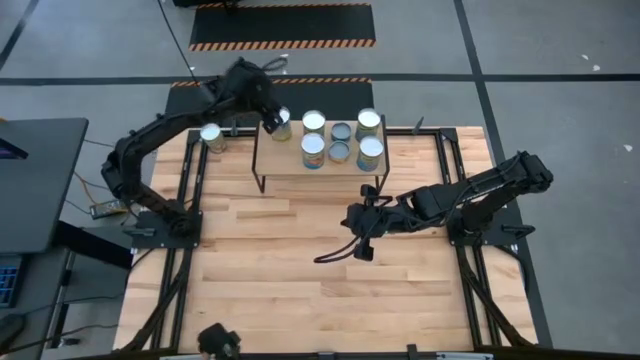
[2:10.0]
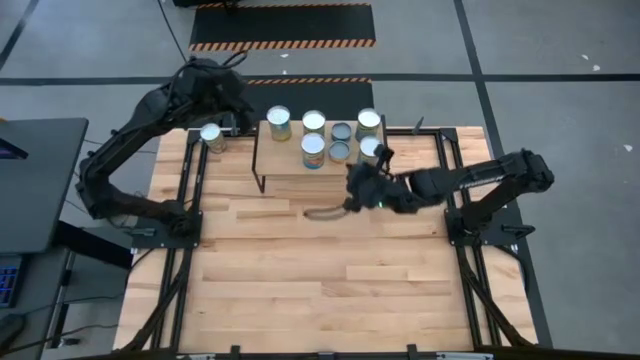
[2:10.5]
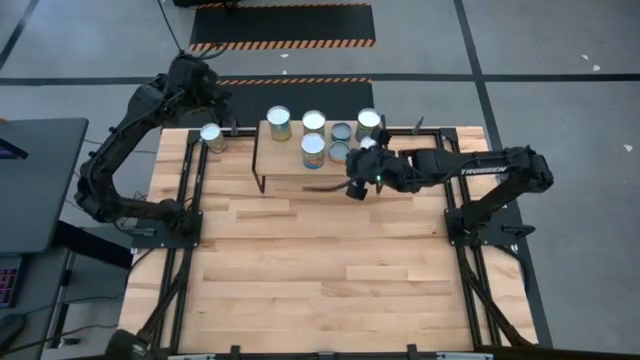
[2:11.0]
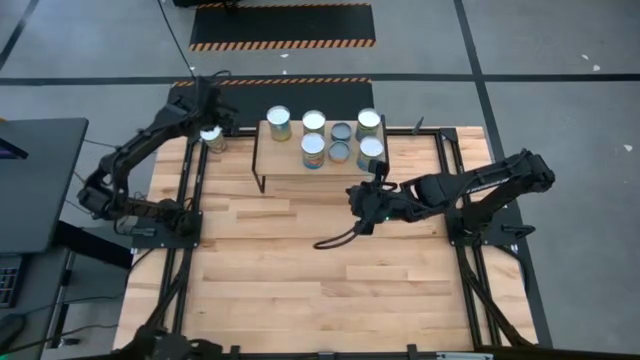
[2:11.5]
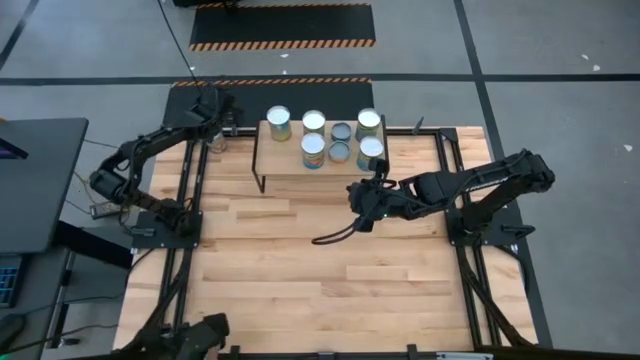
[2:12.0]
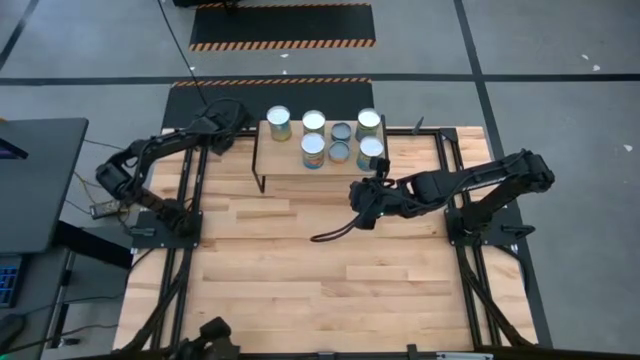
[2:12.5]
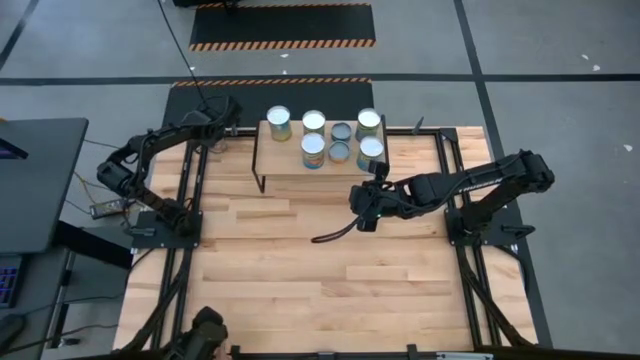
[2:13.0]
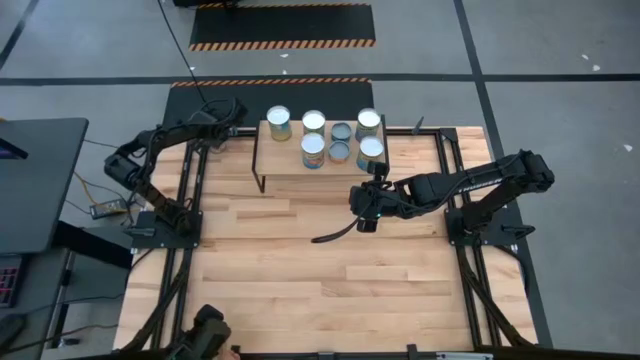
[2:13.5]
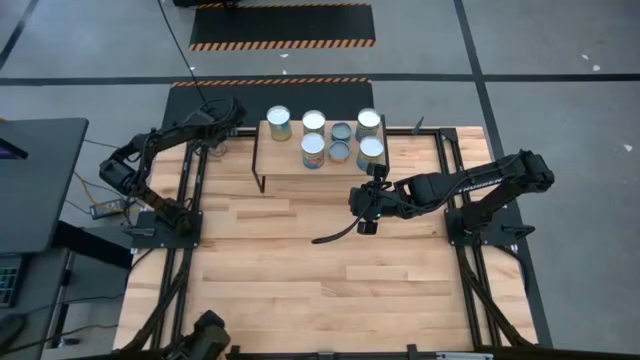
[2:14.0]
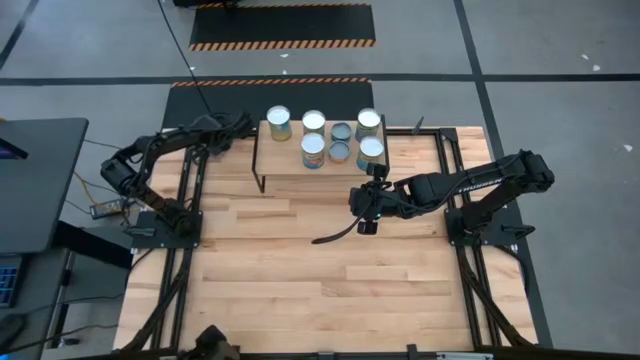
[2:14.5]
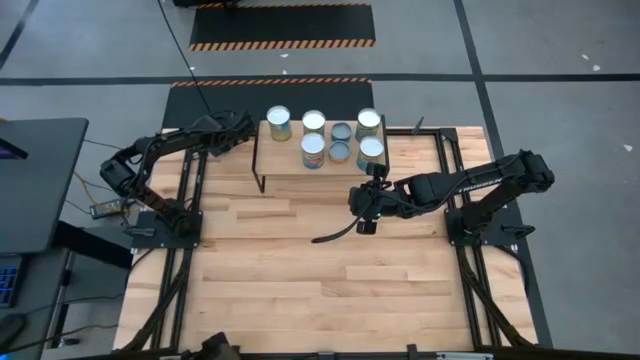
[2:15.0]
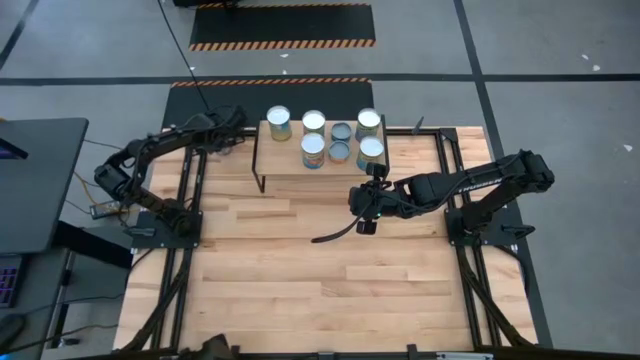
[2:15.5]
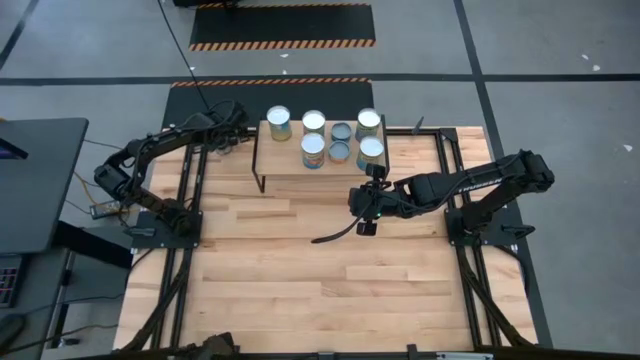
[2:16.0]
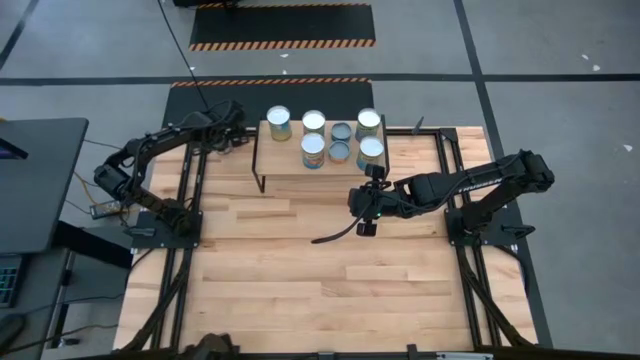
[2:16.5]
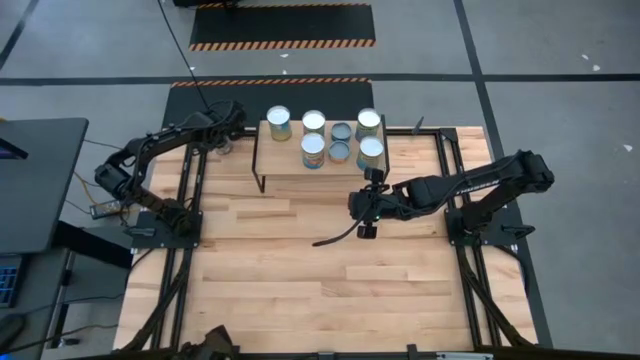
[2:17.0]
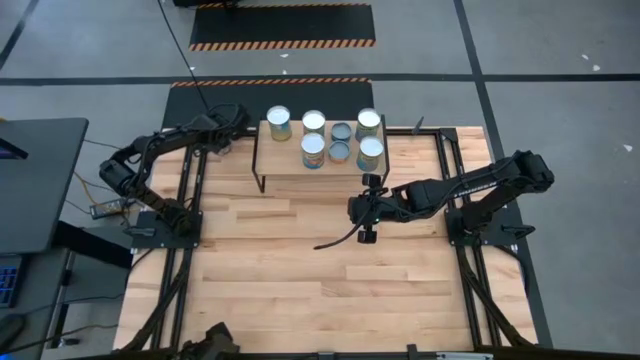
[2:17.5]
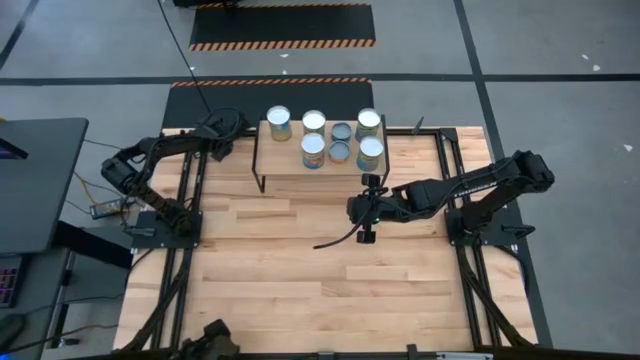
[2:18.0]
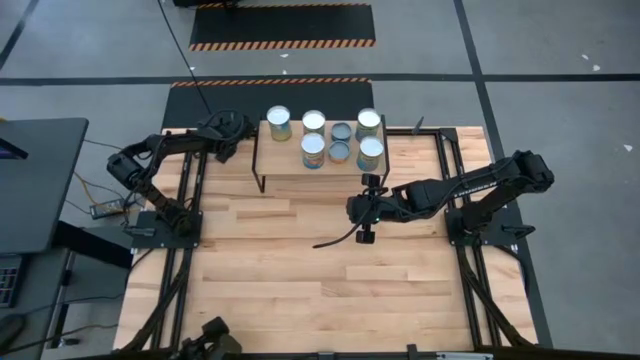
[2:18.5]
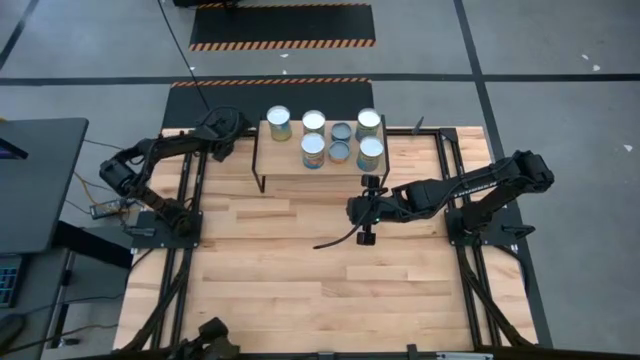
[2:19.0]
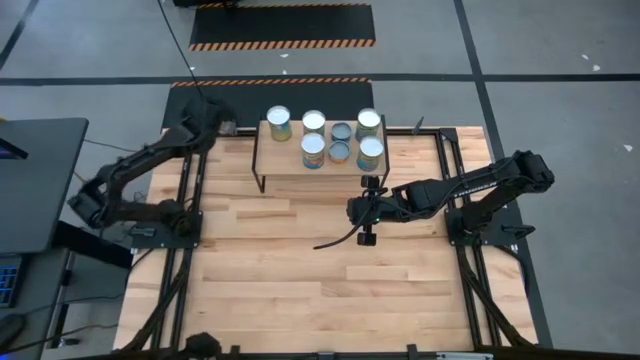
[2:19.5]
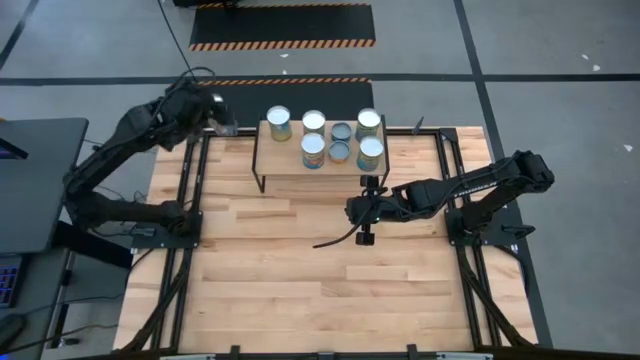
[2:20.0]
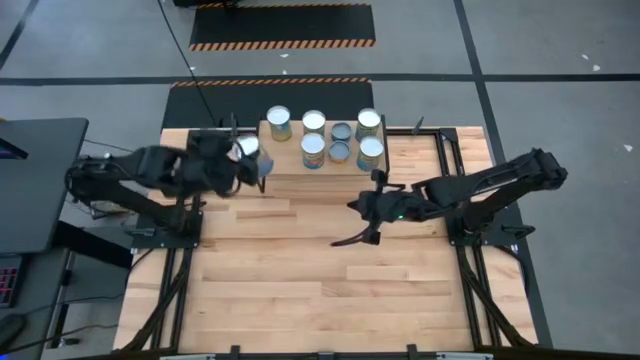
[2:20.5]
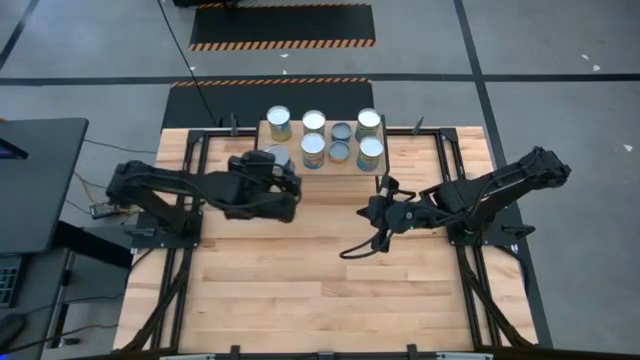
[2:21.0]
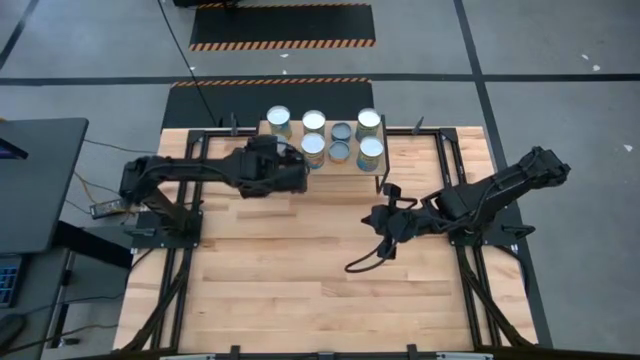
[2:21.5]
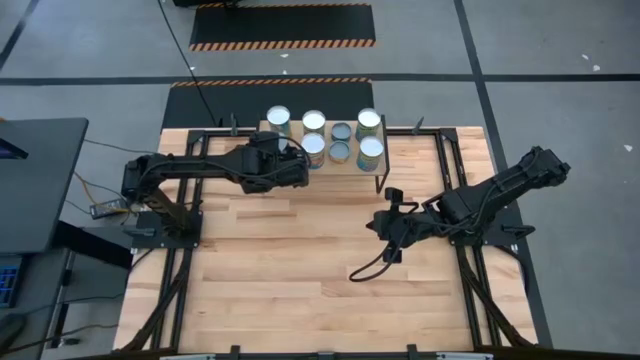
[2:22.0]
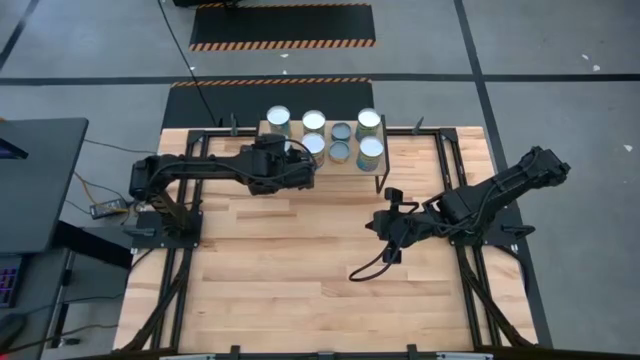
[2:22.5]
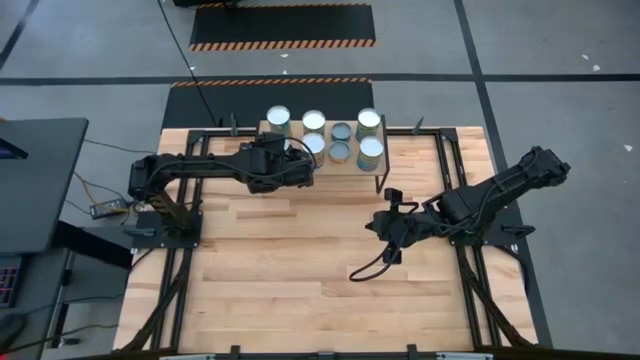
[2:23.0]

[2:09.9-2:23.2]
Task: Pick and place cans onto a shelf
Put the big blue canned peaches on the shelf aligned with the other big yellow canned carrots

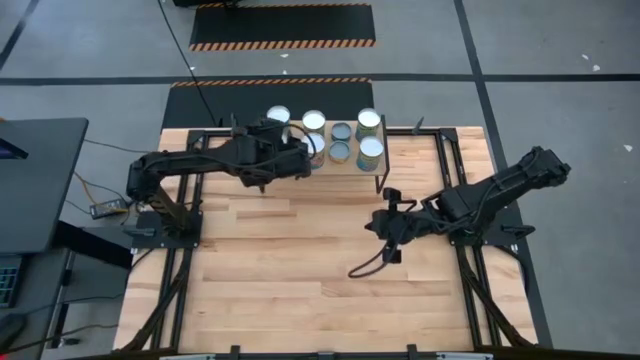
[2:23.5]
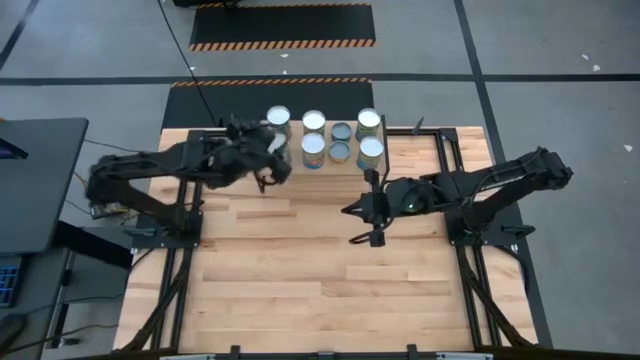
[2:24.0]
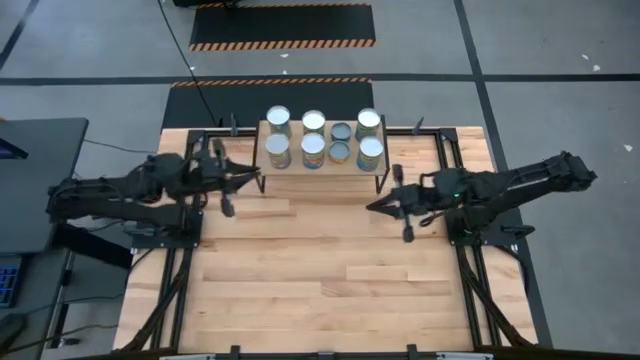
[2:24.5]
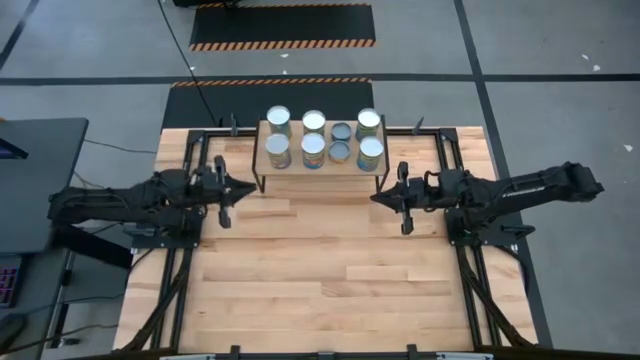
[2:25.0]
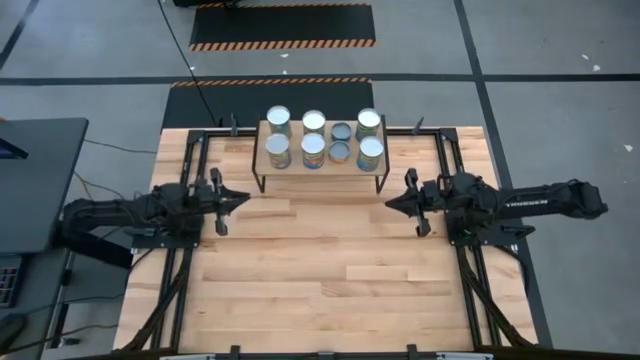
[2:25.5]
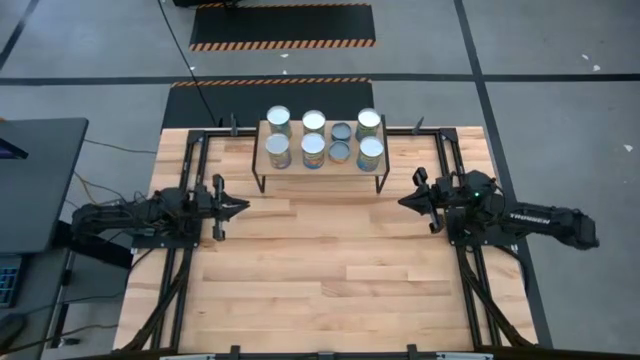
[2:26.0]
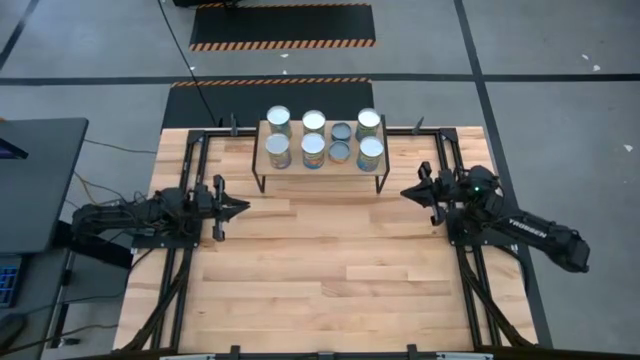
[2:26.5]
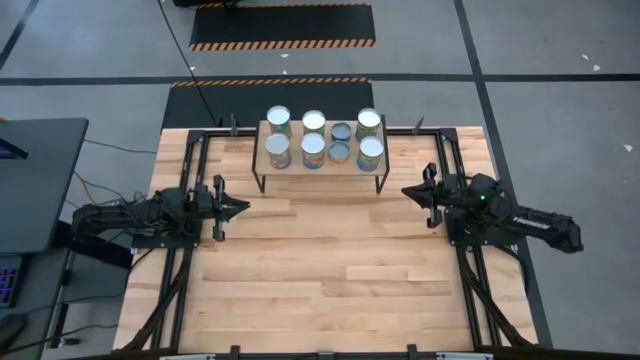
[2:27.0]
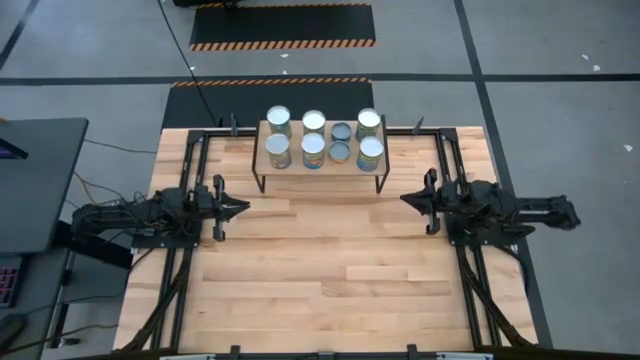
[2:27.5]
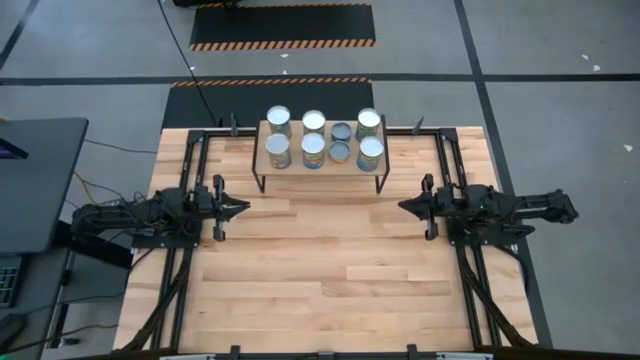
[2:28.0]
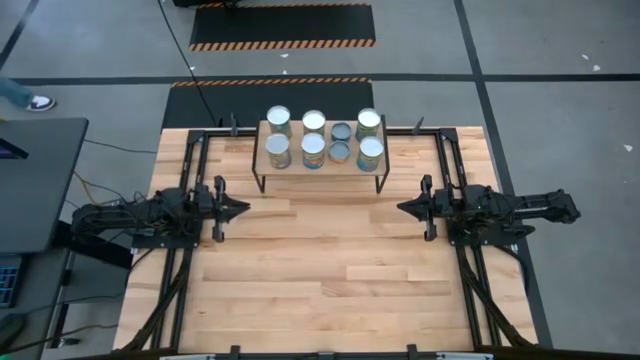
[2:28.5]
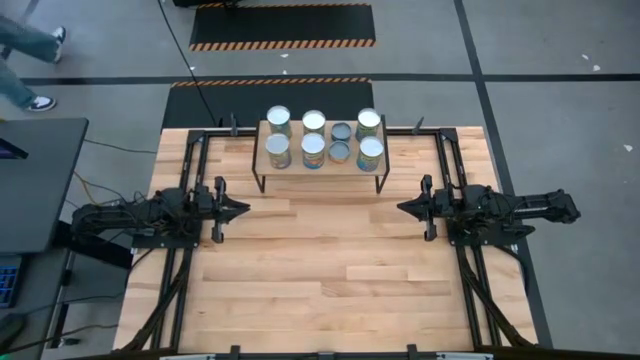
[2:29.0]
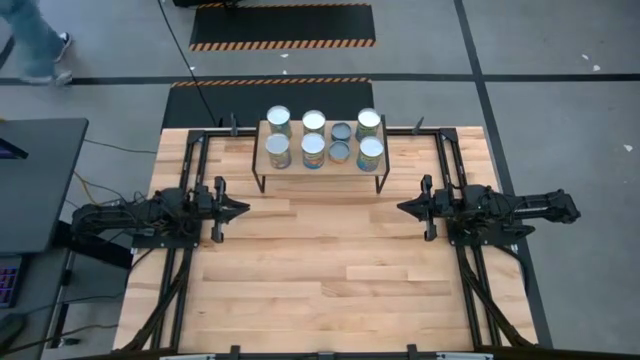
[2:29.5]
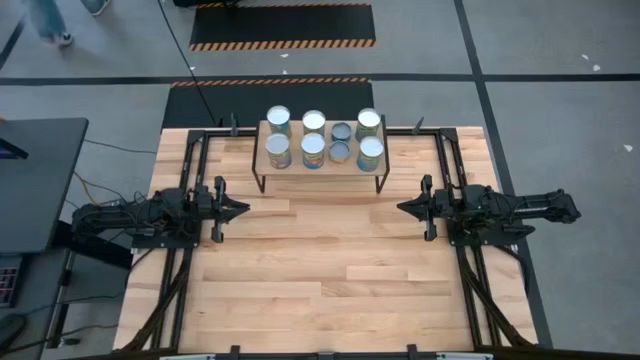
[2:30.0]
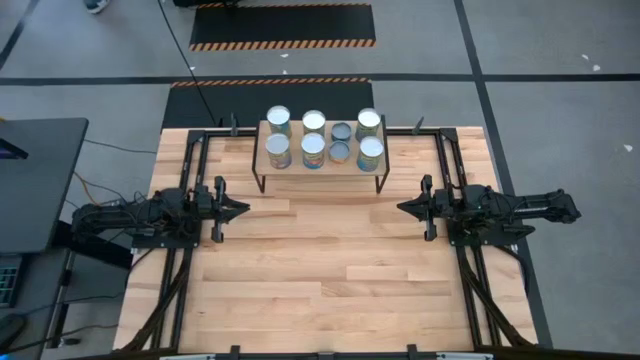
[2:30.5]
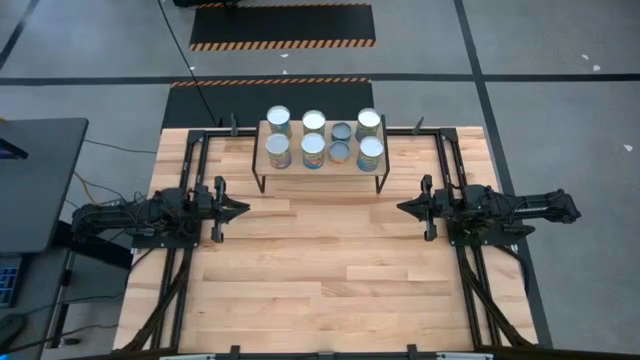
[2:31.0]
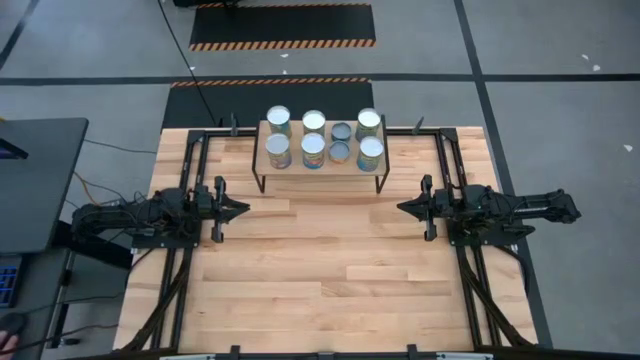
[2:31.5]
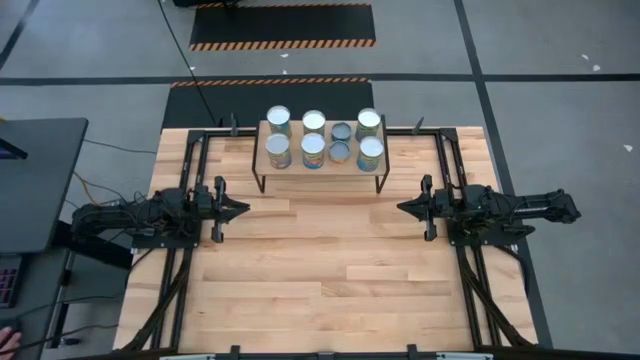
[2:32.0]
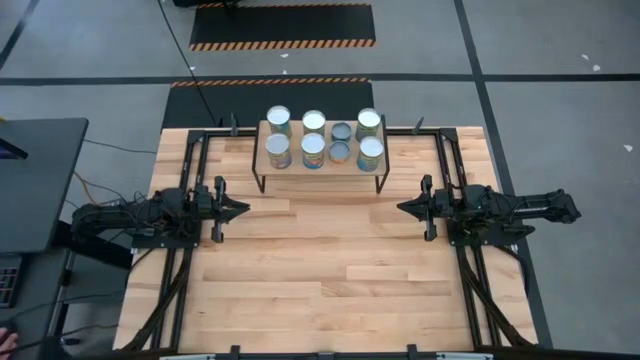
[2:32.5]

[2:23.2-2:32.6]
Return to Home Position
